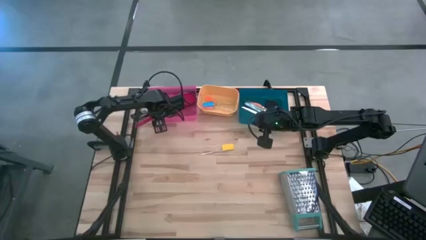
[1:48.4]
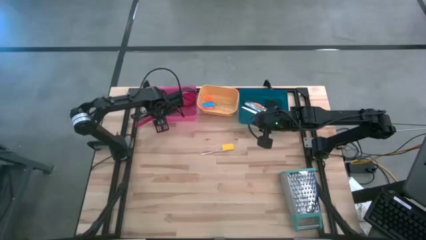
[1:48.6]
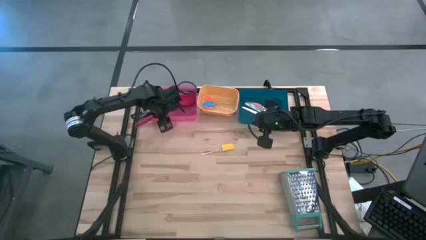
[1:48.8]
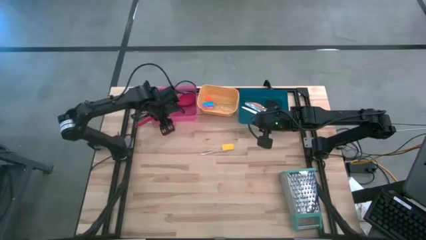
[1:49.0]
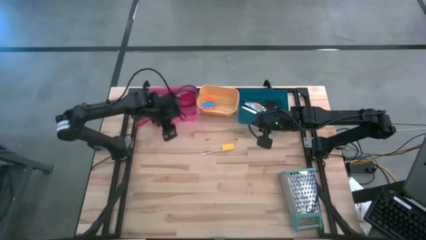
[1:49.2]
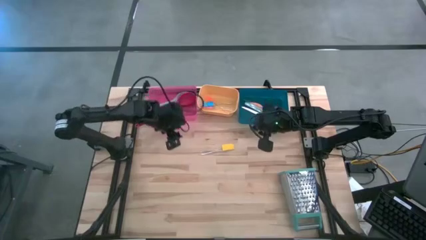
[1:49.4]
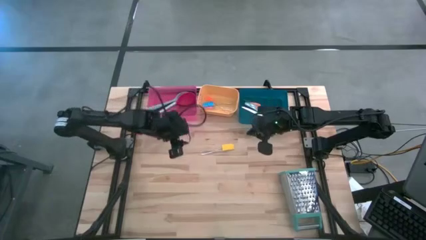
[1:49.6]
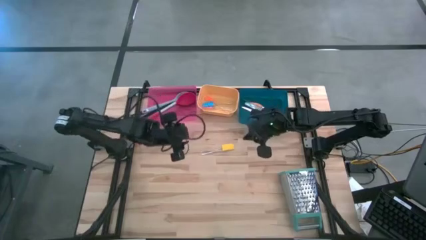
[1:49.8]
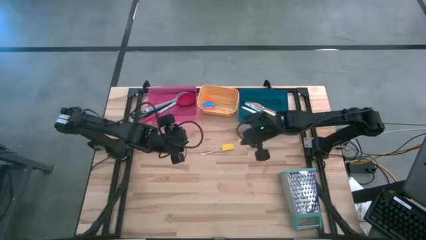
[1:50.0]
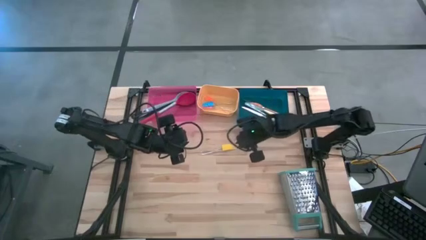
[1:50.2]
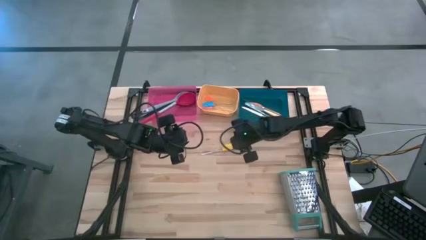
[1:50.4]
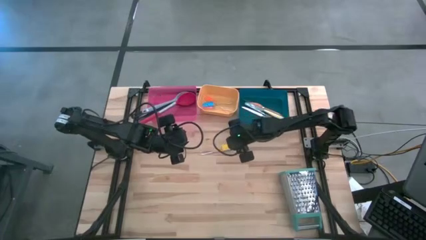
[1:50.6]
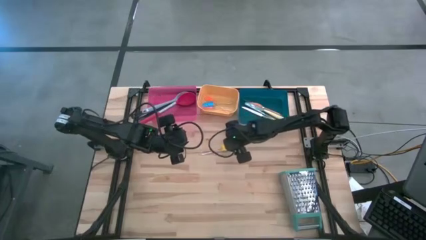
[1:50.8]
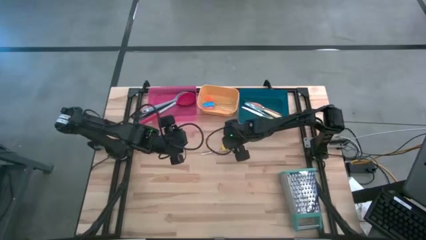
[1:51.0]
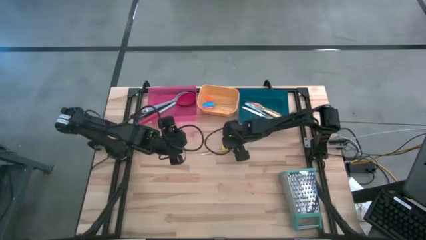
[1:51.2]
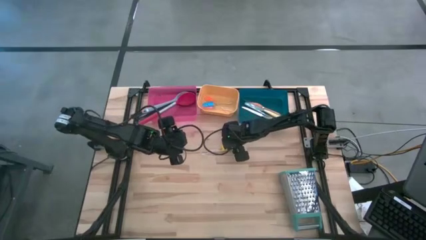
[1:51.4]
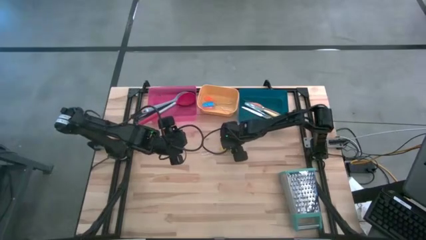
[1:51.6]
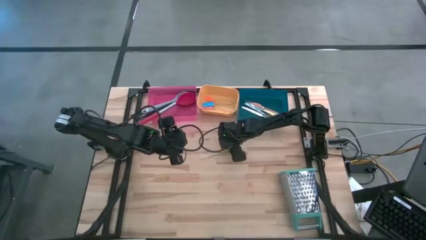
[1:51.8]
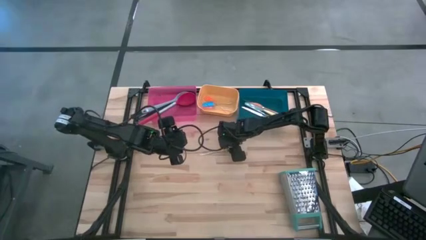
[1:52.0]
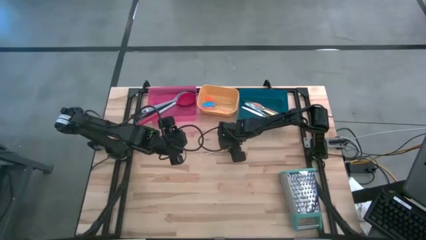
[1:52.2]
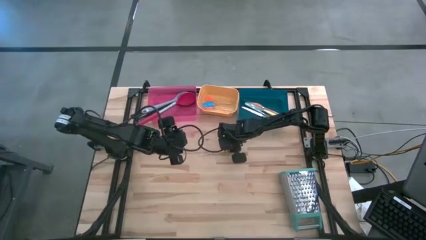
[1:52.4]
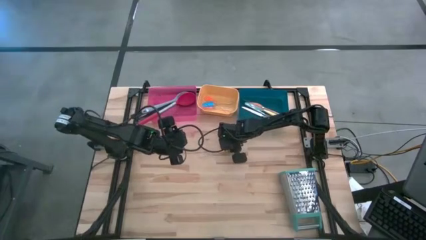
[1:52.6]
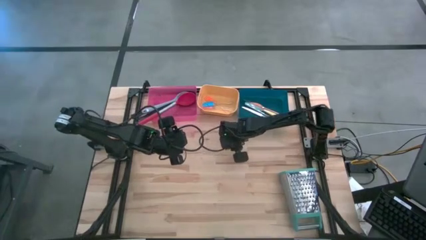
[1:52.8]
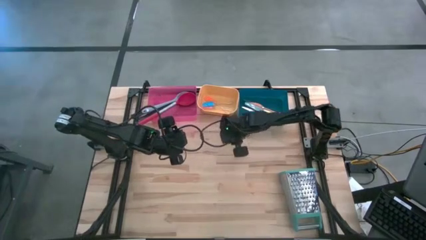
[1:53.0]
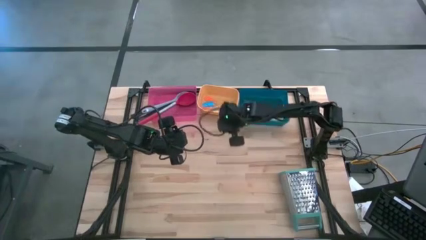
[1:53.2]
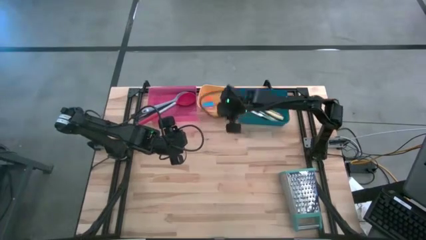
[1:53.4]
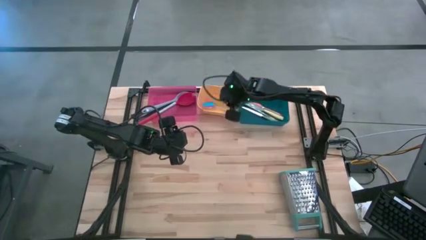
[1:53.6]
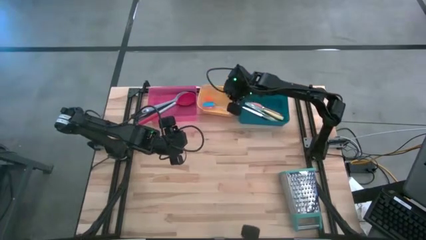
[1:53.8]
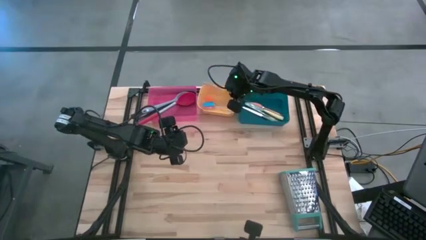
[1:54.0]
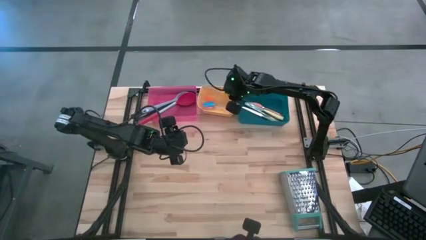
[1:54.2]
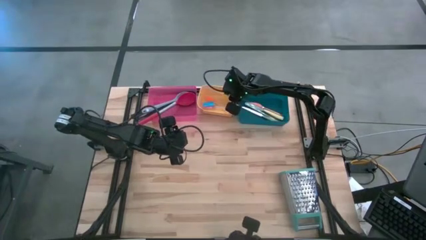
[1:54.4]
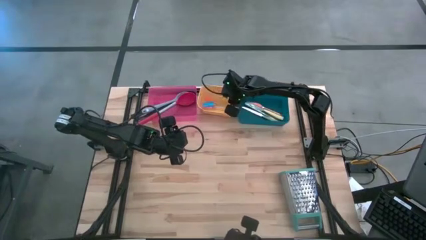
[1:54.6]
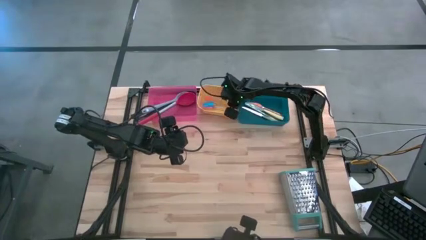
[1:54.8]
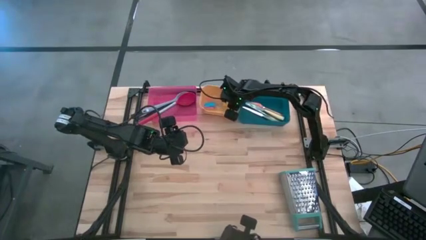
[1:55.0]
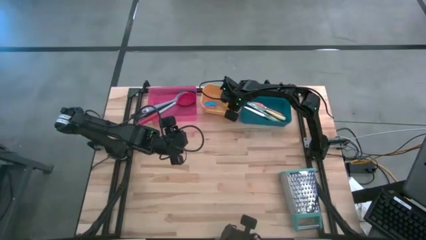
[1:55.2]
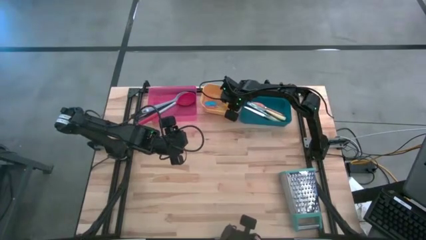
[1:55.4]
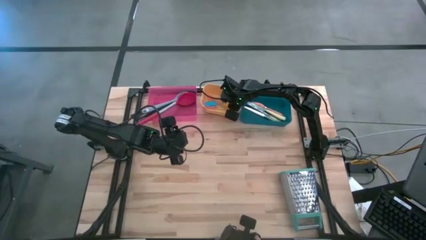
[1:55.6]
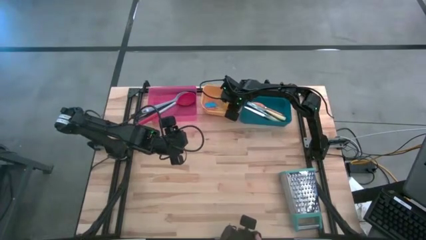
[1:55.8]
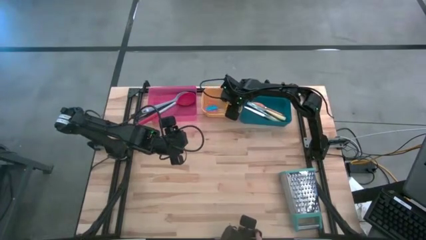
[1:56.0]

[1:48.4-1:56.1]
Task: Pick & Place Kitchen Items
Put the yellow spatula into the yellow bin

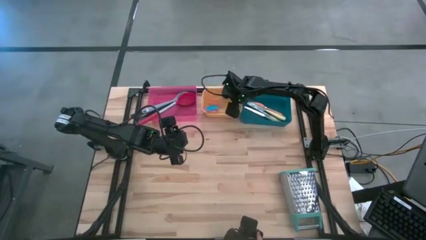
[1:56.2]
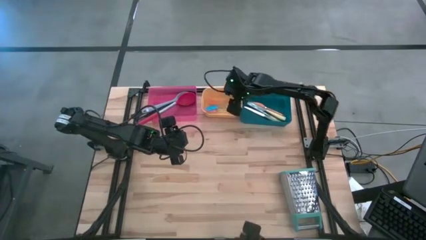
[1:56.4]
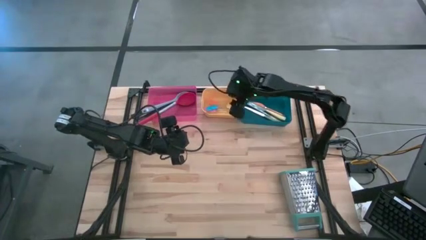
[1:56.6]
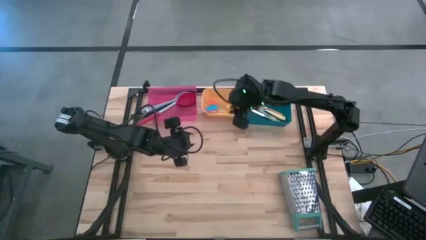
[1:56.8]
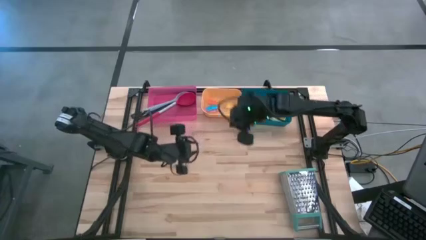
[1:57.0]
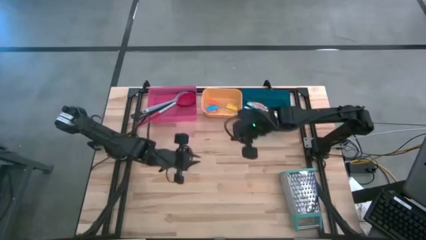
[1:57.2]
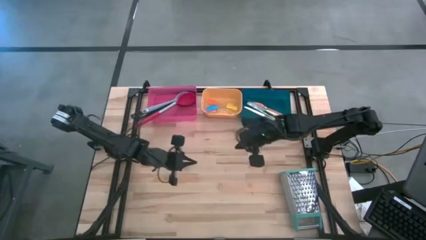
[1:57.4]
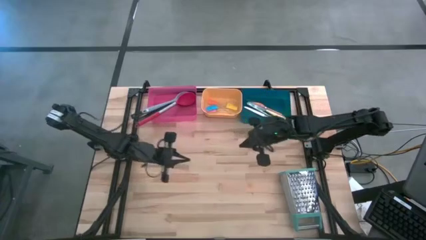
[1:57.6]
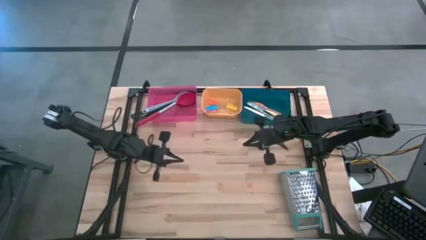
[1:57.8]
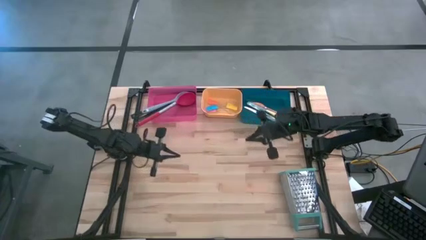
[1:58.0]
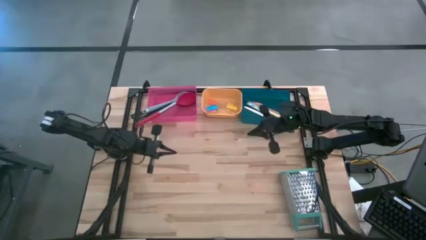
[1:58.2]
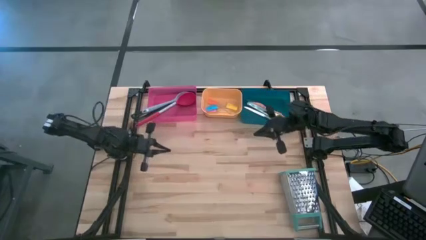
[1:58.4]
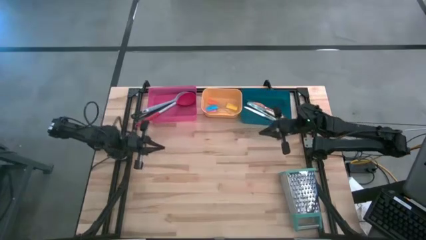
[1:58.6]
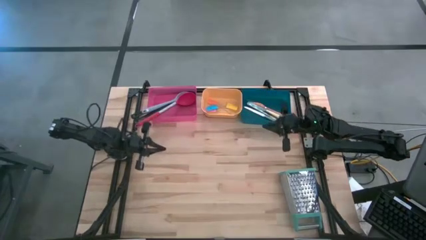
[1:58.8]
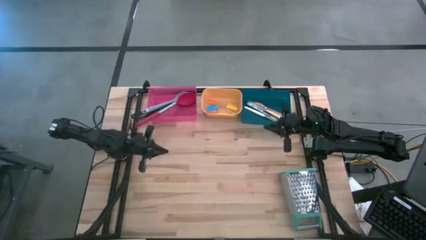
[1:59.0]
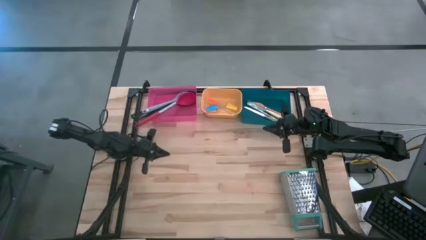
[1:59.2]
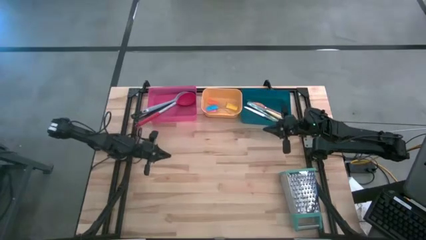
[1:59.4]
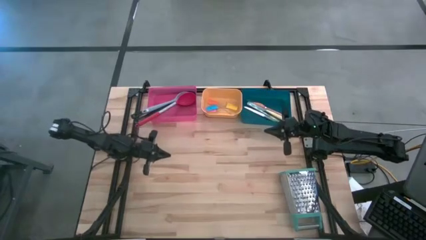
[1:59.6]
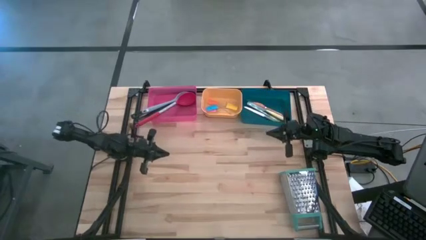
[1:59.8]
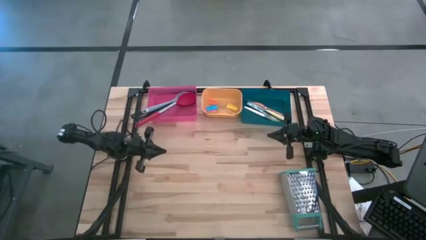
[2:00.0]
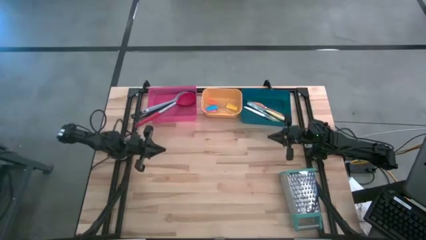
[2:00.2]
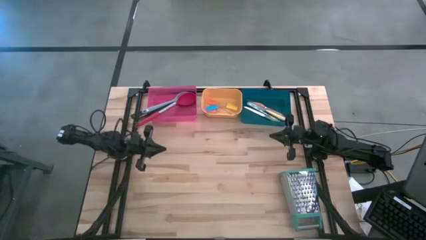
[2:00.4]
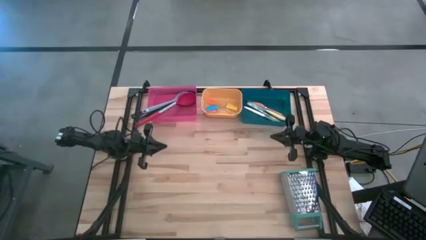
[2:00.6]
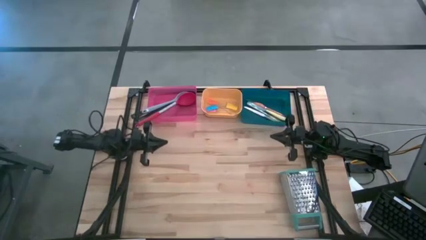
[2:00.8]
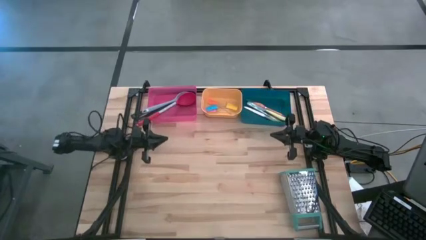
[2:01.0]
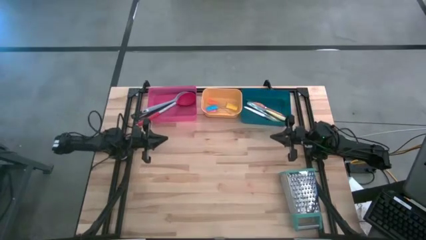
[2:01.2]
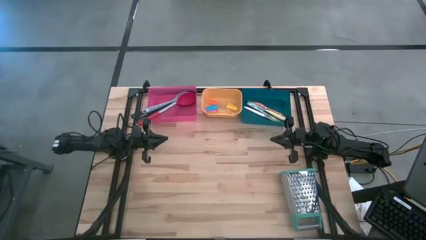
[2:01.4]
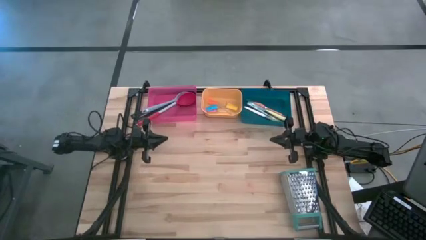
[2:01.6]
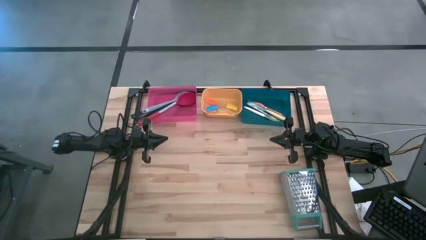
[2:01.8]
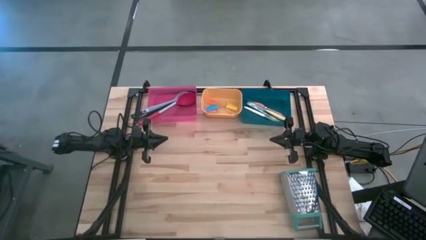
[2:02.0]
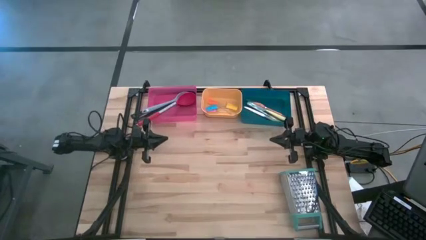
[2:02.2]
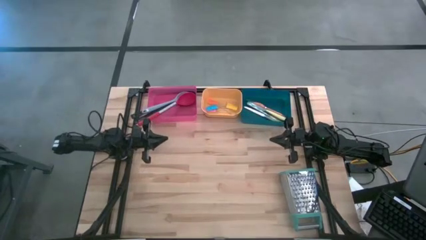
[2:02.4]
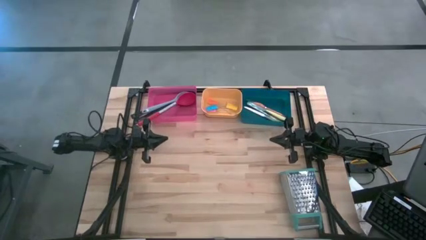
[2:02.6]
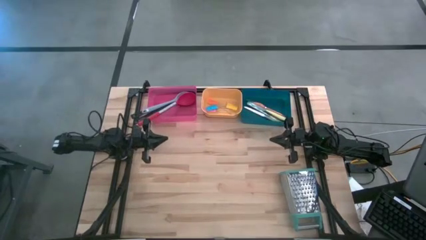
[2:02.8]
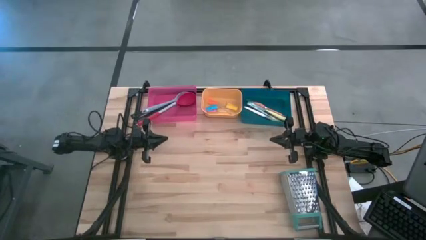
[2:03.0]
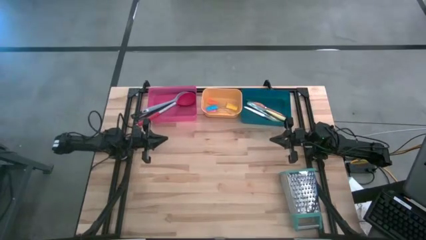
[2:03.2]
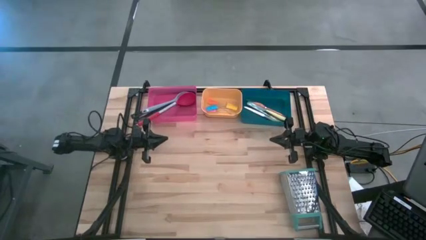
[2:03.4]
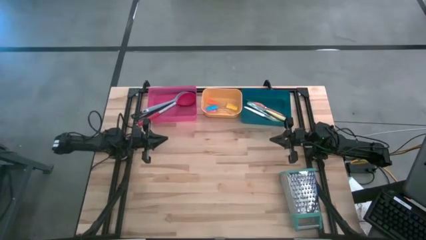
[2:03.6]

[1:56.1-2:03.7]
Return to Home Position

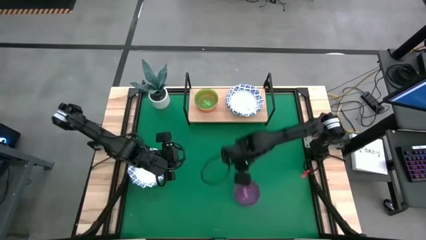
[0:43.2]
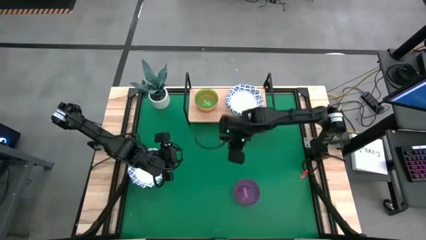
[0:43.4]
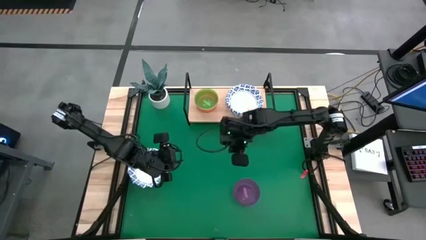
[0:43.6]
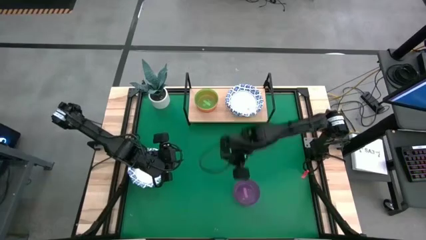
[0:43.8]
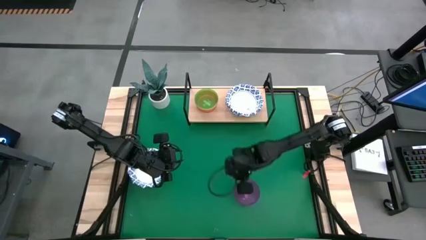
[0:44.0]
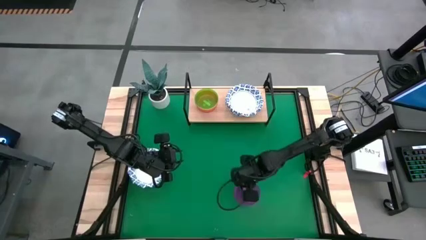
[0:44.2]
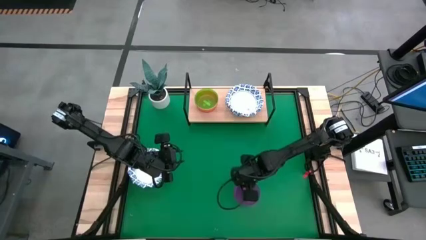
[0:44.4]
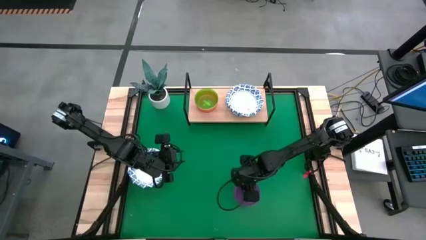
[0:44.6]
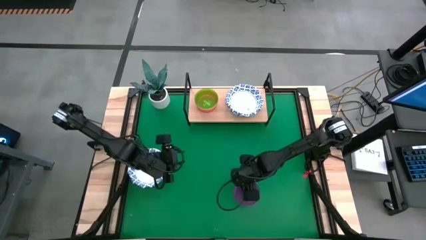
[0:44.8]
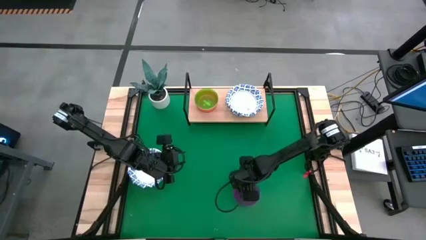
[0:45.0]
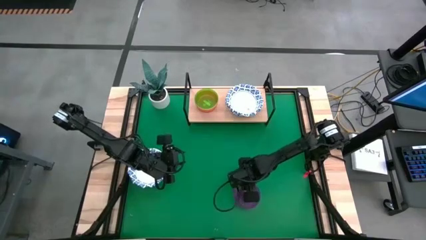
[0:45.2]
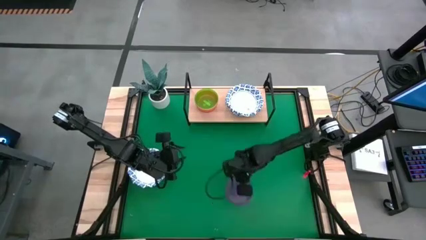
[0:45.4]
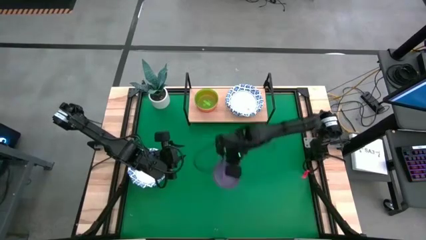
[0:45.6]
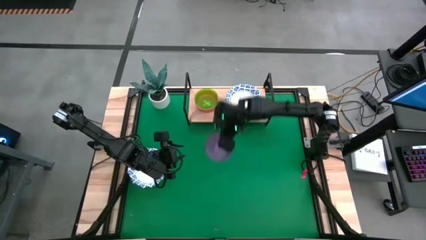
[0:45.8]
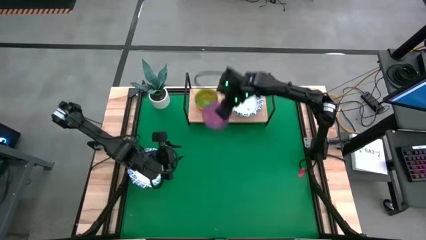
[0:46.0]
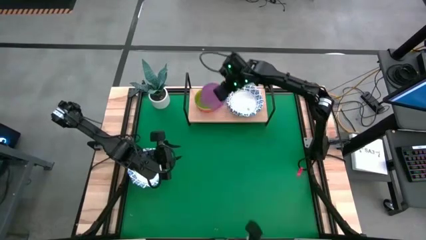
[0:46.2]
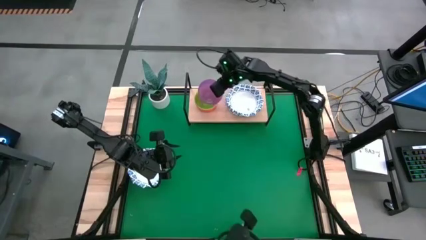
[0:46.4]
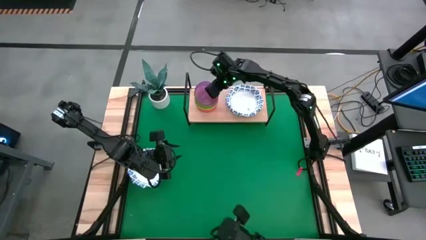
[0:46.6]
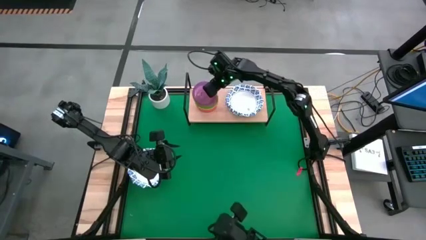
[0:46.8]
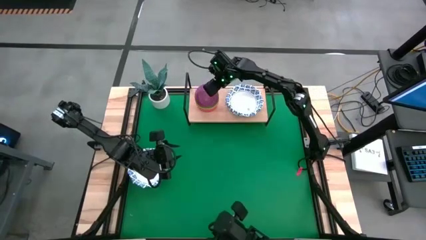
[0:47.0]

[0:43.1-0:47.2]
Task: Place and stack bowls onto a shelf
Stack the purple bowl on top of the green bowl on the shelf
